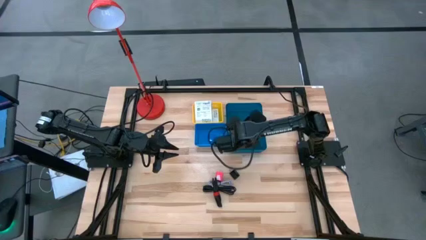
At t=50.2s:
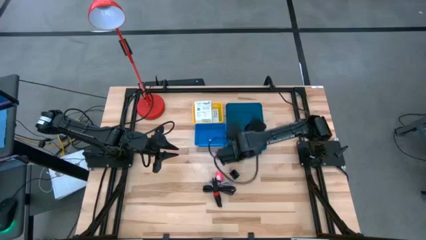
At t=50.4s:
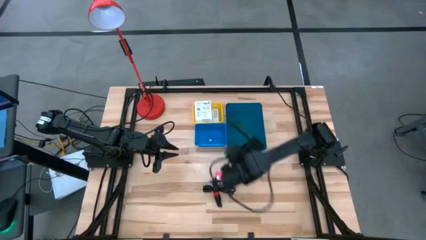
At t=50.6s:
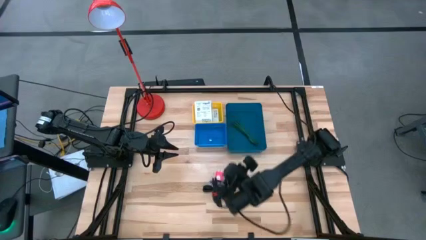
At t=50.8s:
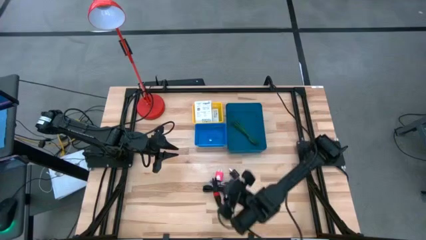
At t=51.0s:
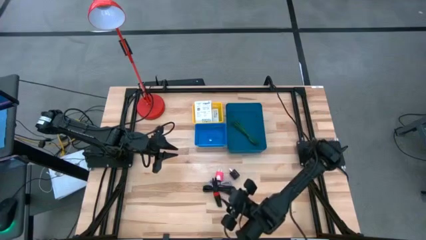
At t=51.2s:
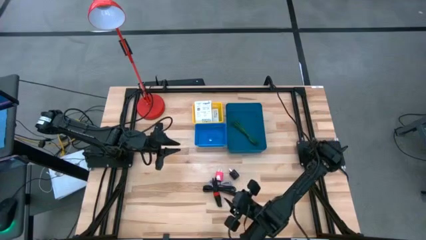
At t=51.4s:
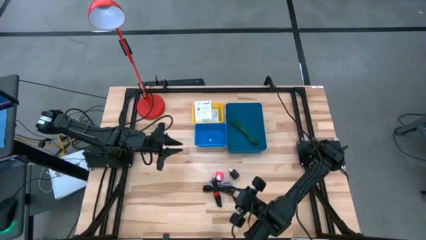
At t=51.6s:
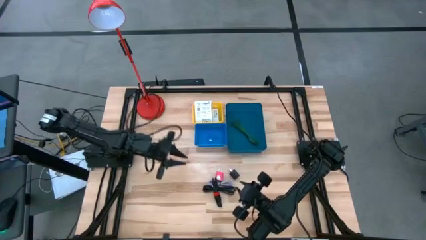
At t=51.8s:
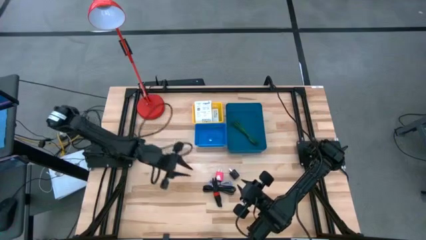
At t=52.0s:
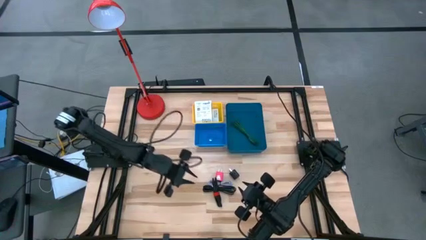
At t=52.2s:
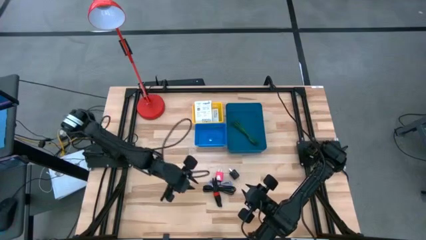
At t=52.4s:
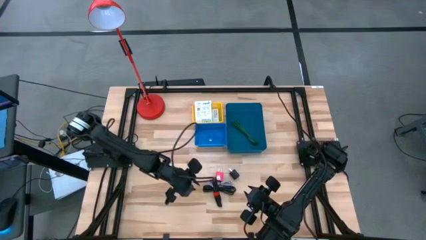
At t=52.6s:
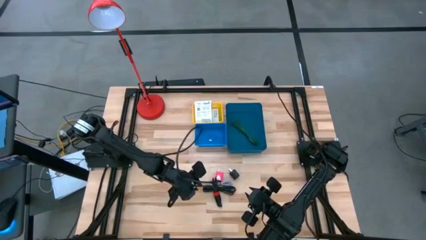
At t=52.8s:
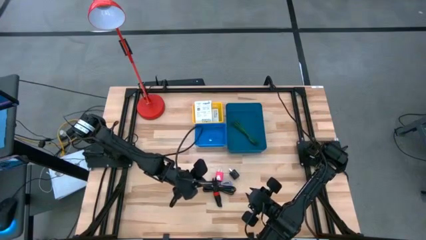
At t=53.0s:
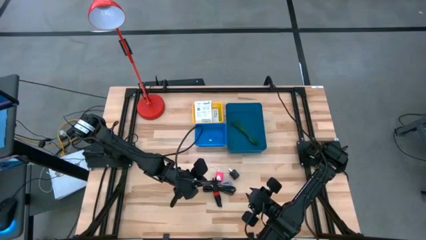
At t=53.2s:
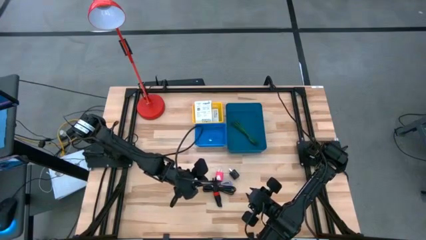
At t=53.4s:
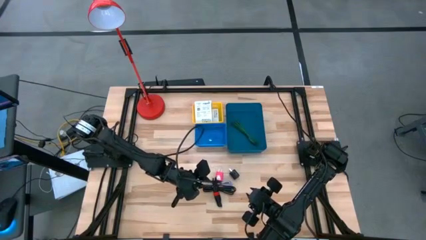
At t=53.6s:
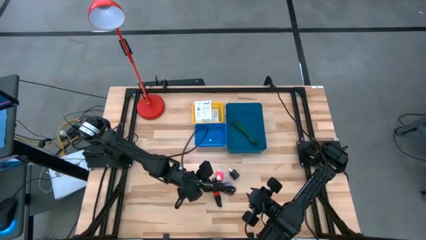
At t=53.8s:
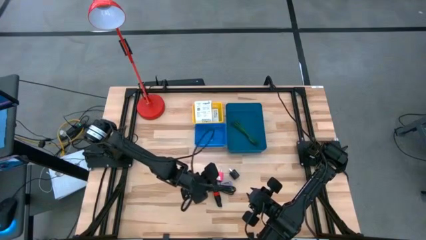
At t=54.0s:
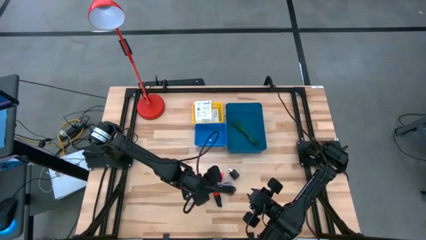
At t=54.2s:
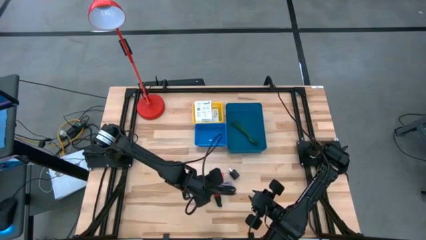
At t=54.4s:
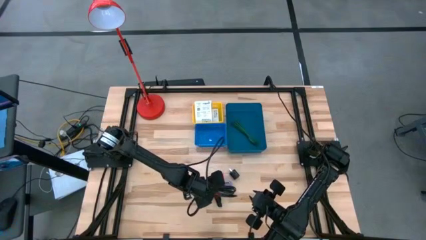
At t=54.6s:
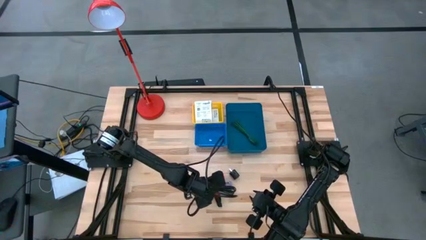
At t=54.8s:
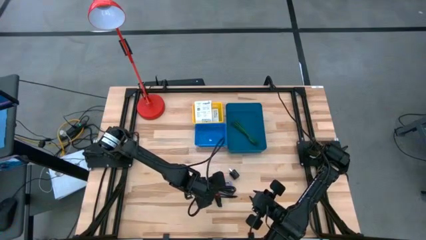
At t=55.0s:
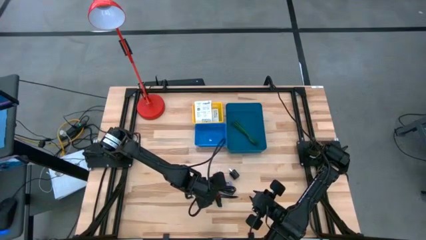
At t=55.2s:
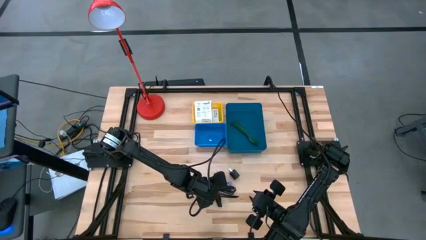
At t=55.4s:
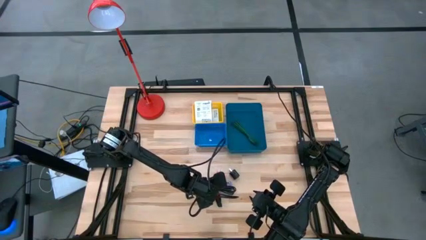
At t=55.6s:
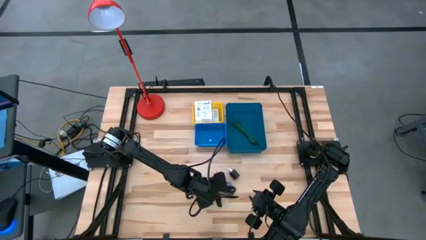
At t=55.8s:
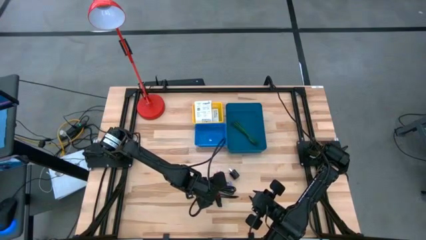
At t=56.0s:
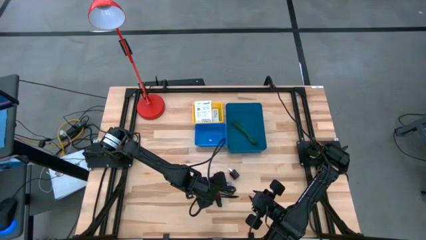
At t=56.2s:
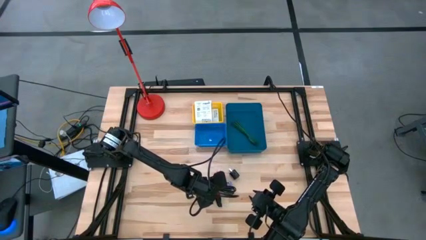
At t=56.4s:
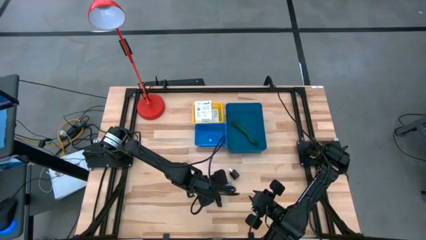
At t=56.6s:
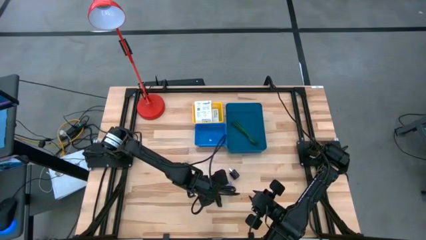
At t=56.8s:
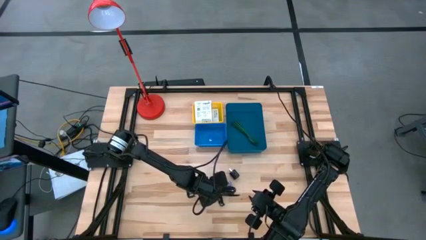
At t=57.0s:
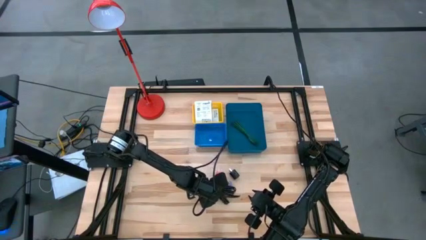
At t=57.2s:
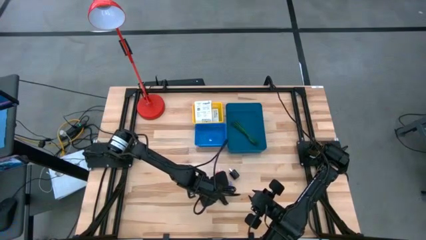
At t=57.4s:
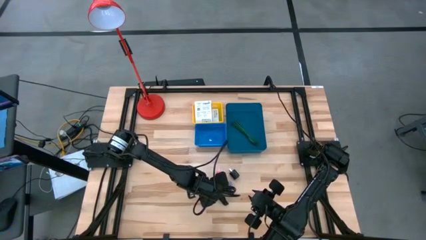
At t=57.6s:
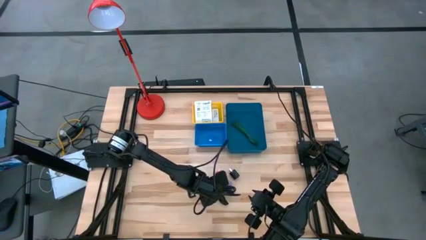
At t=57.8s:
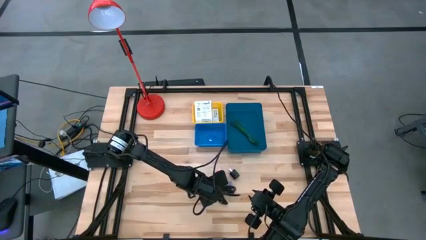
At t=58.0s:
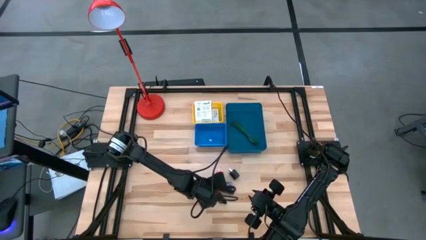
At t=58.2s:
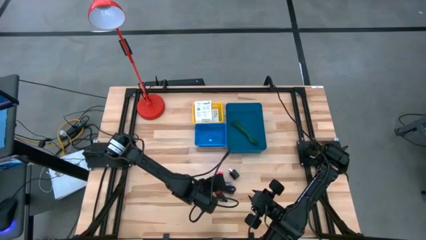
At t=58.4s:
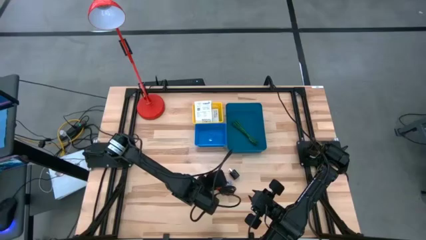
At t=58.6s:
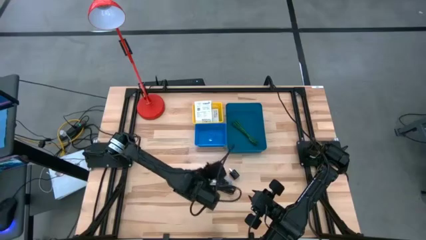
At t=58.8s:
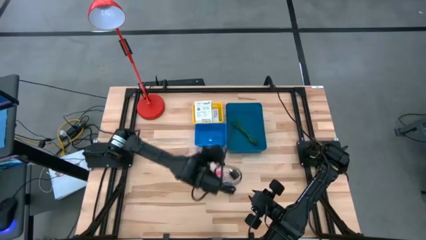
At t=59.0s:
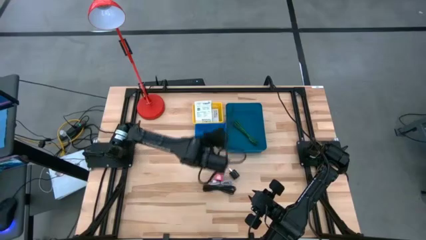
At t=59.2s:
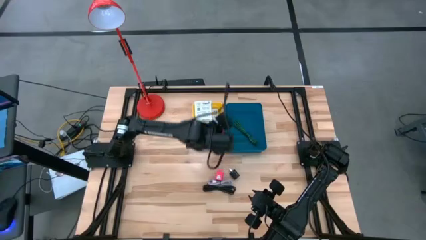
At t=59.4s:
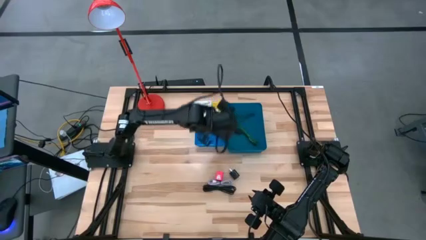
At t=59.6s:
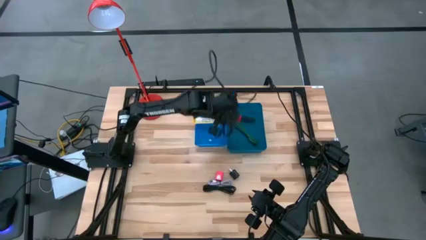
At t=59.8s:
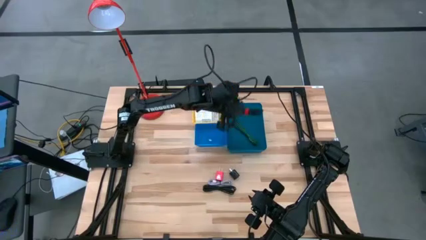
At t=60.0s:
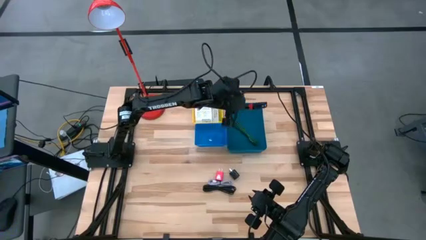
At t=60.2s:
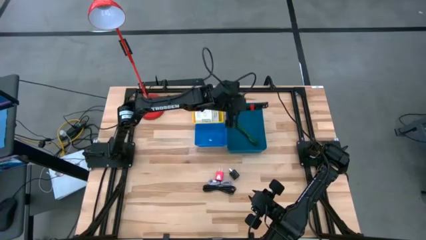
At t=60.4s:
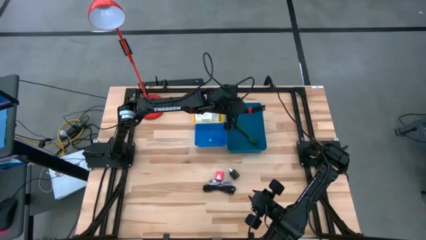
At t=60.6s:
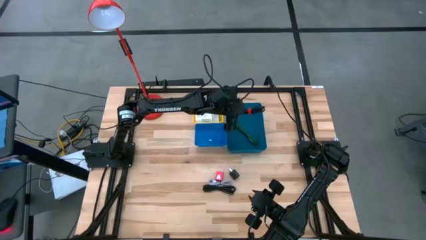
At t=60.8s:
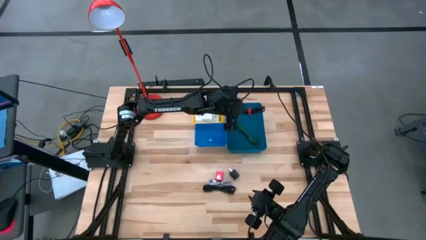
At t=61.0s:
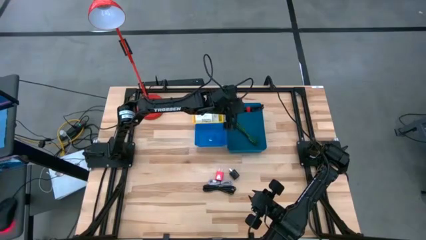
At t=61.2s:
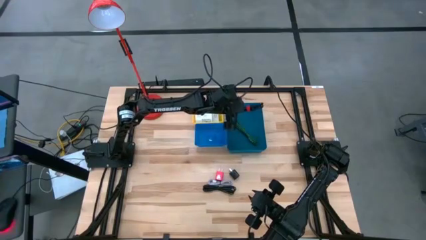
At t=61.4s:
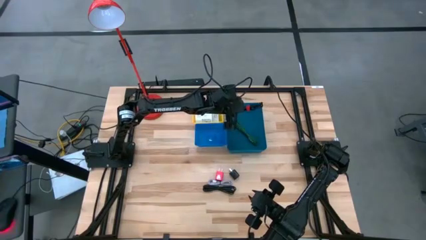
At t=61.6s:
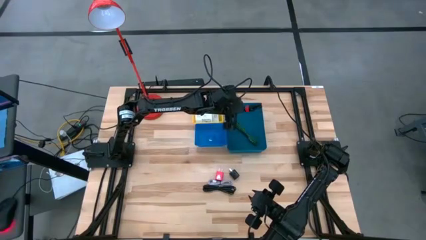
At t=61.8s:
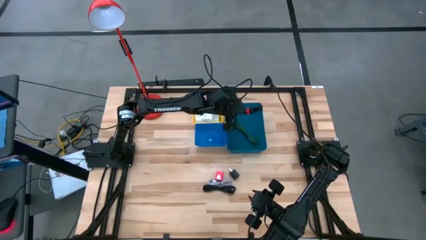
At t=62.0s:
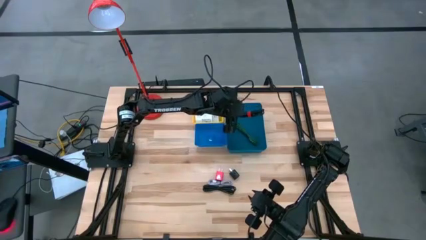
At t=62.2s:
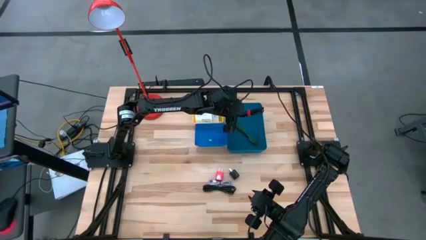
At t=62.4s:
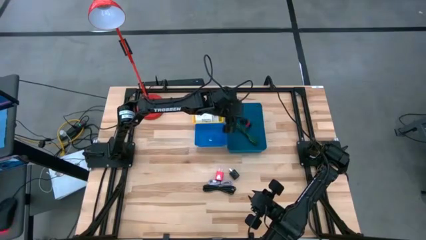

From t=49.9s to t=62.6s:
Task: Pick and place items into bin
Put the bottom black charger cable into the light blue bin
